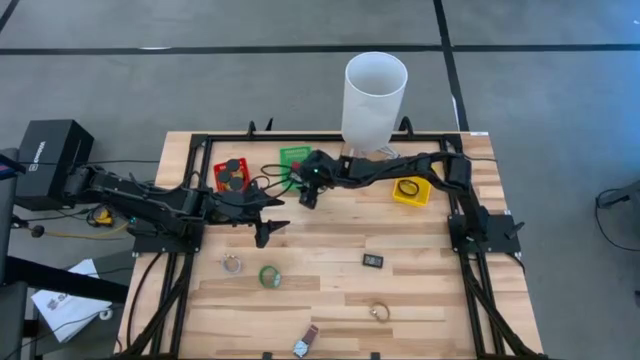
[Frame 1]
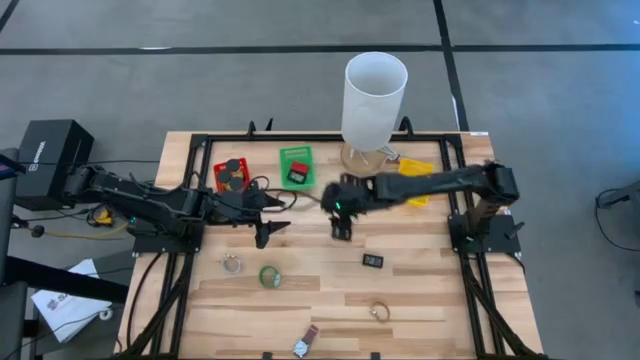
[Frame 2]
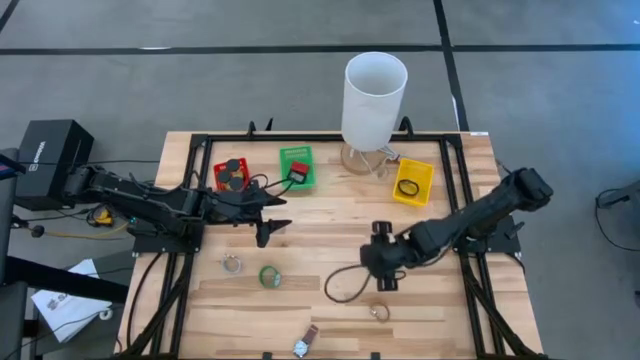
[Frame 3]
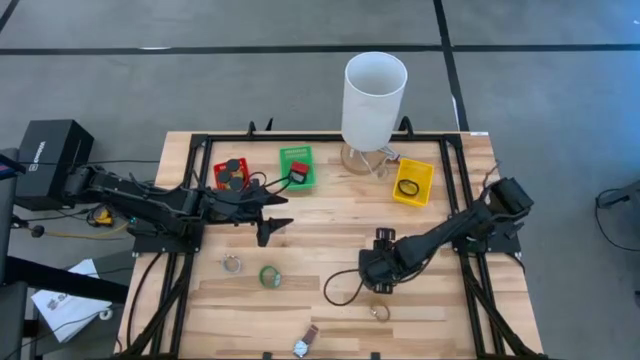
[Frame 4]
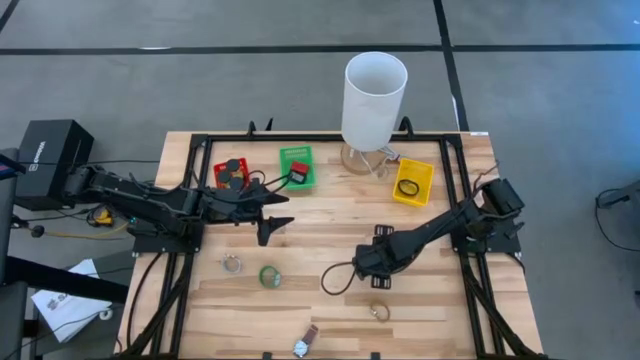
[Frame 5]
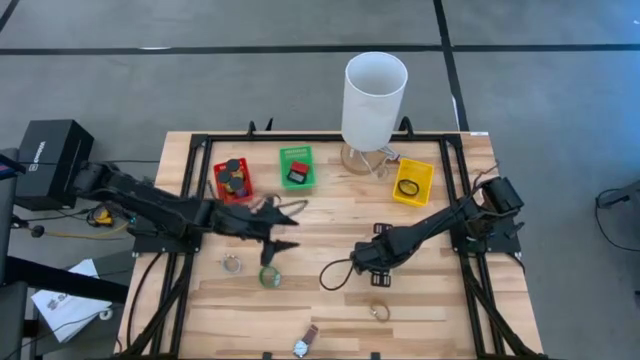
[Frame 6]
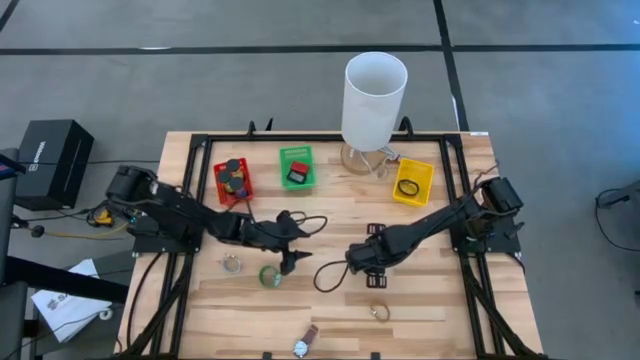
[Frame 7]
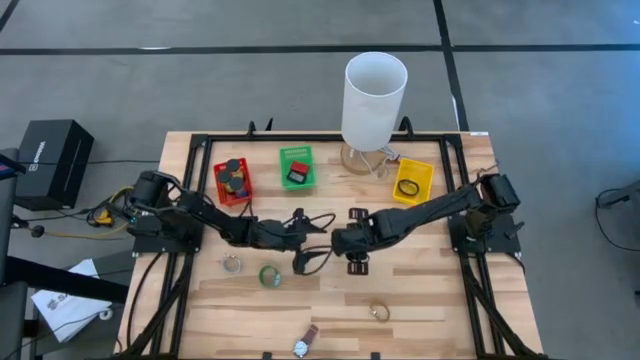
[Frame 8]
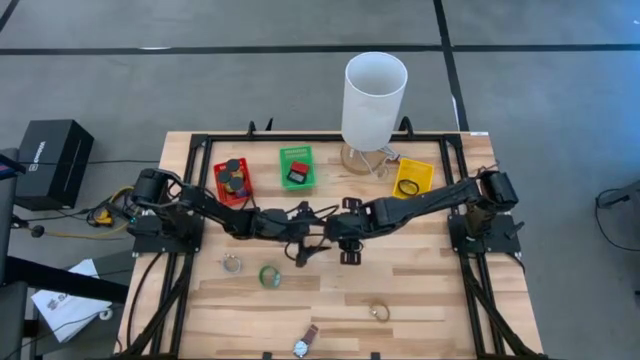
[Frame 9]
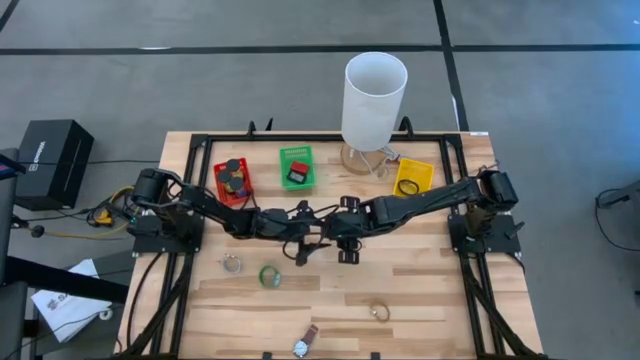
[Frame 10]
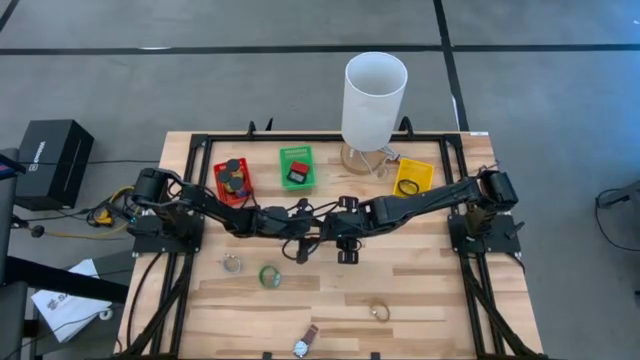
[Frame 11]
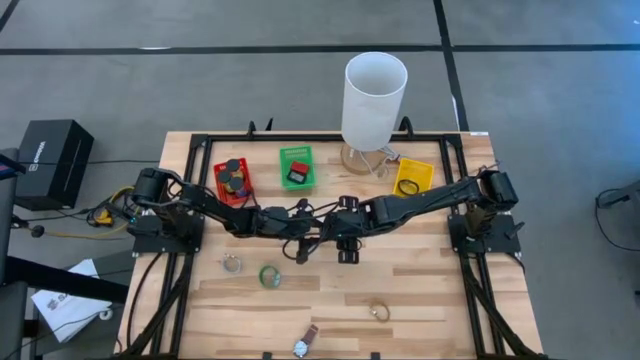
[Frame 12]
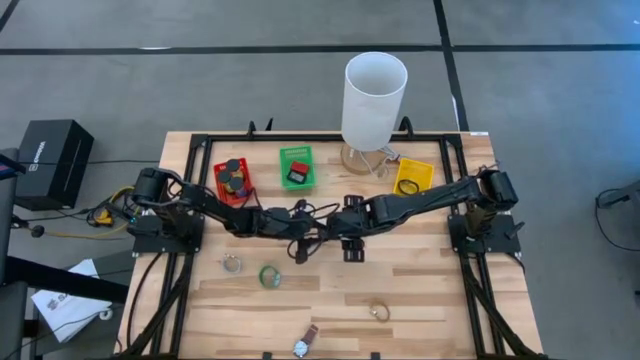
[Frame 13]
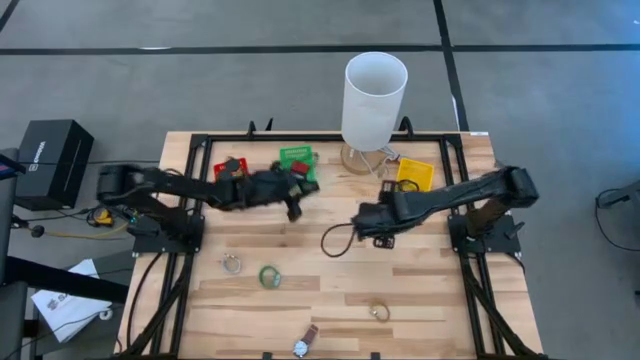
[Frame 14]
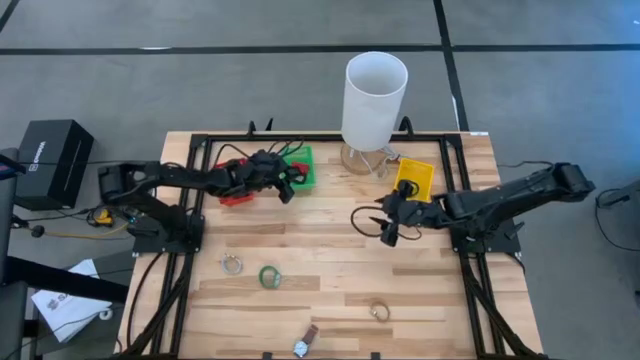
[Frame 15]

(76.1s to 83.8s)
Task: Pick & Place Office items
Put the black digital clock into the green bin

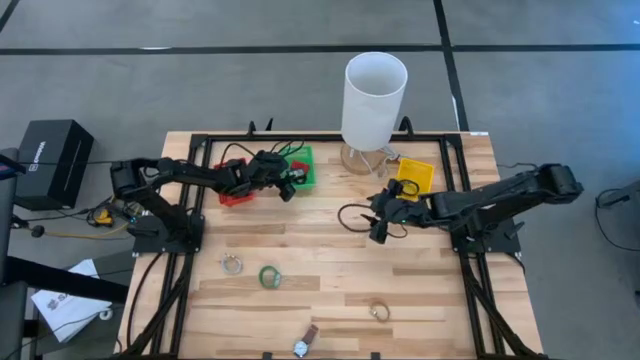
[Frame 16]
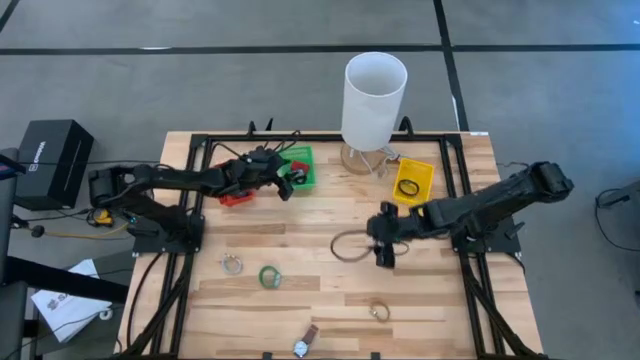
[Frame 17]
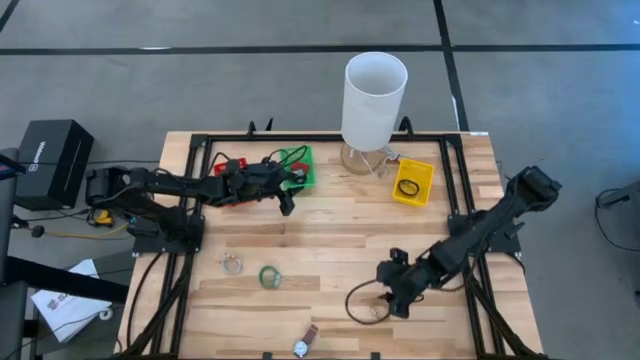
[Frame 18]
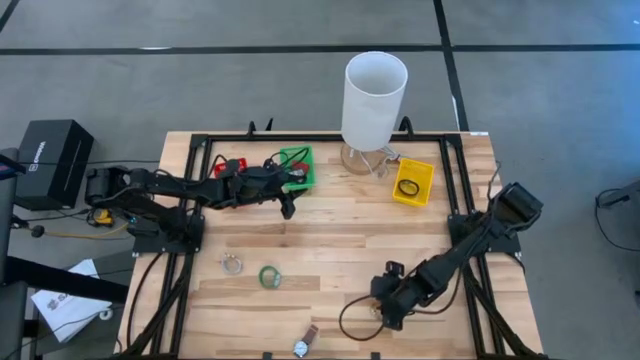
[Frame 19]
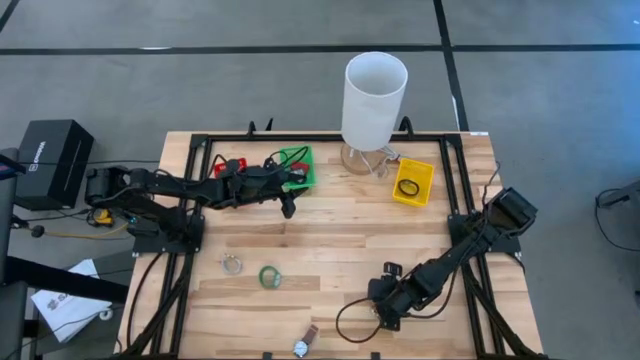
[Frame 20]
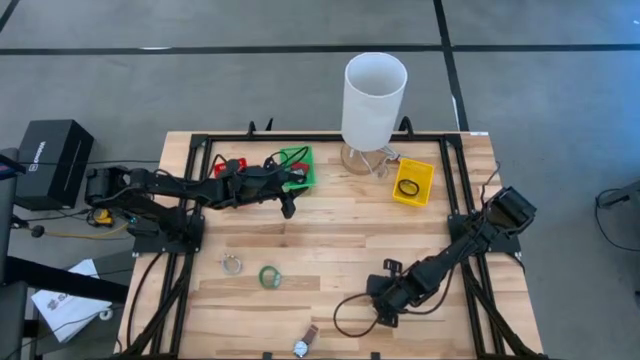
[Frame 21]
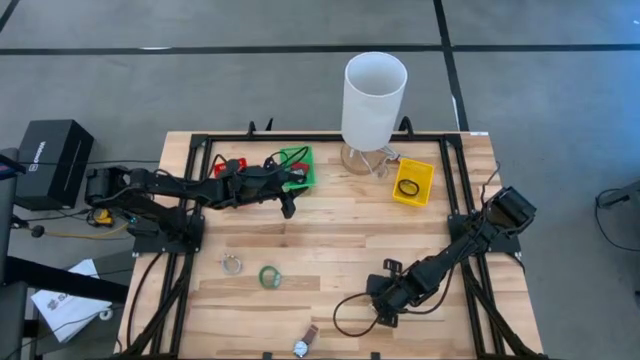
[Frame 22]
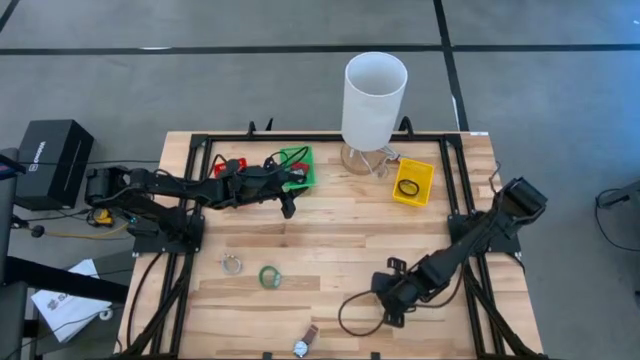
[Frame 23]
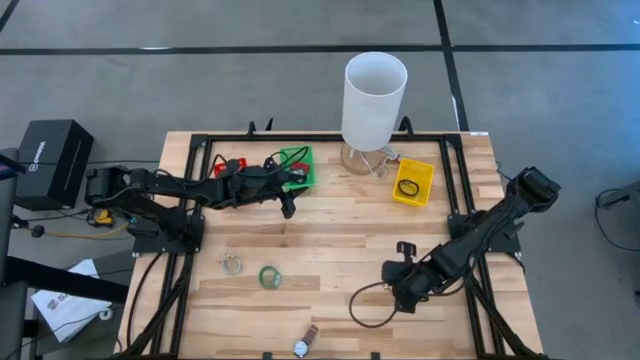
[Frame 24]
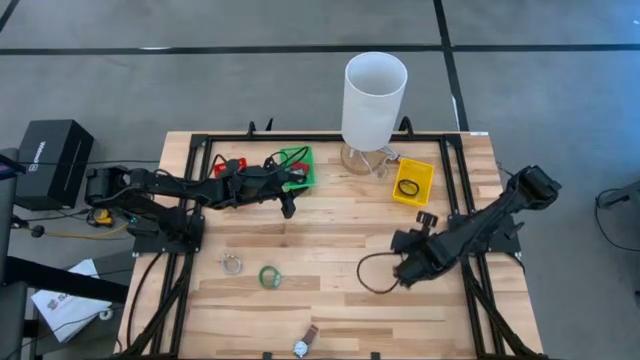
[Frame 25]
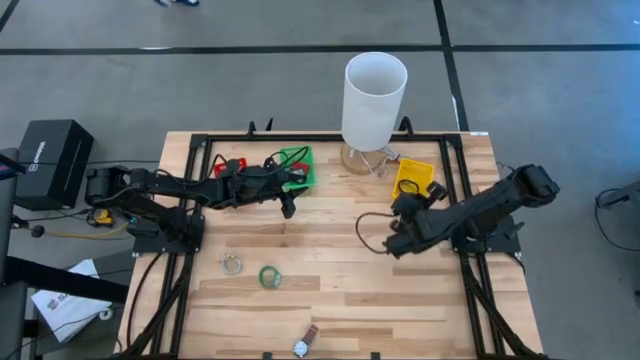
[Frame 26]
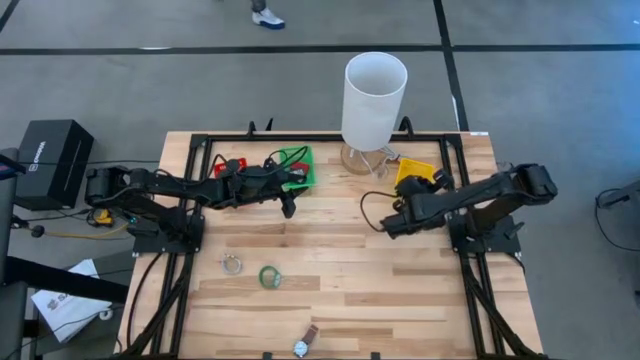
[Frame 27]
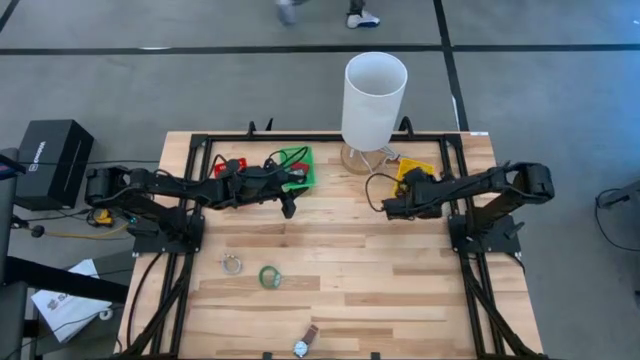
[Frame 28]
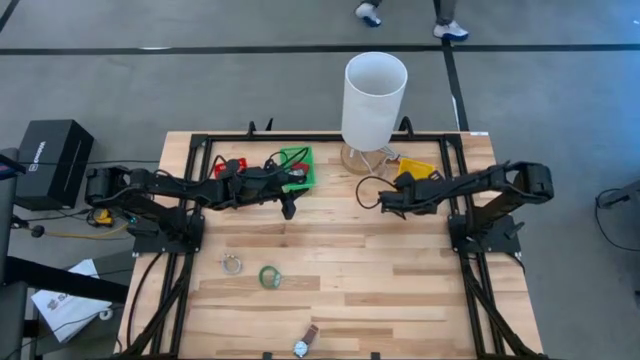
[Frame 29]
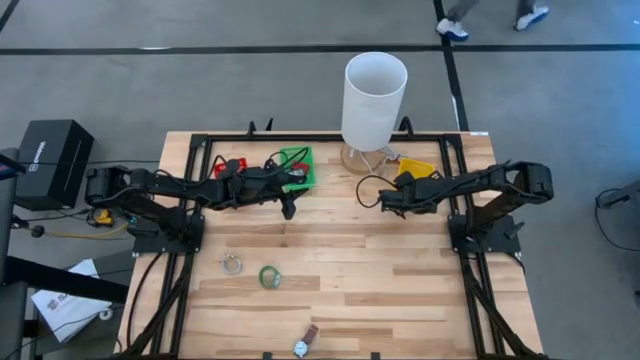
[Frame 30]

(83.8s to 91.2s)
Put the gold wrist watch into the yellow bin

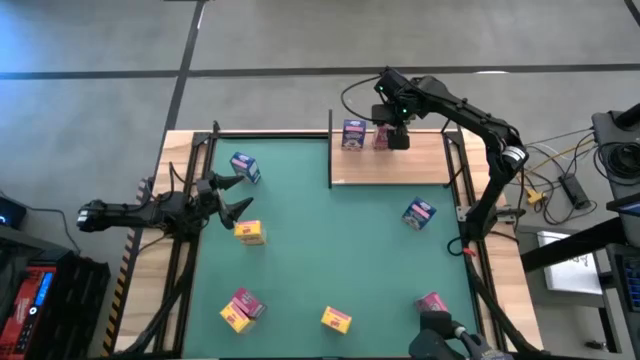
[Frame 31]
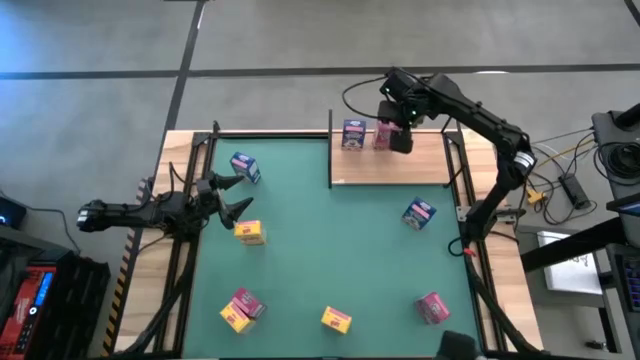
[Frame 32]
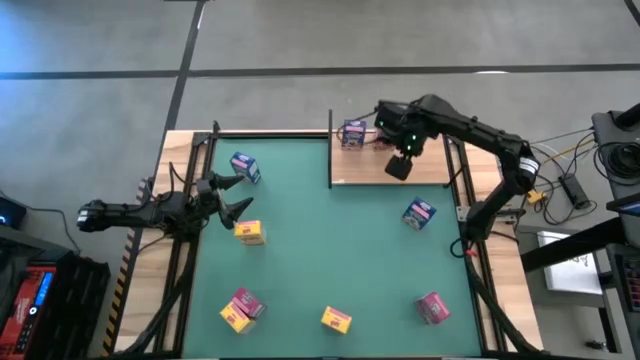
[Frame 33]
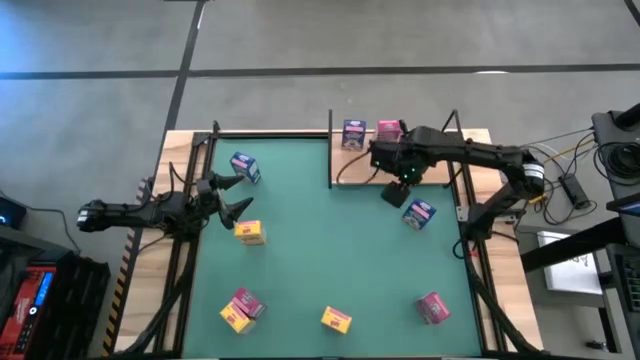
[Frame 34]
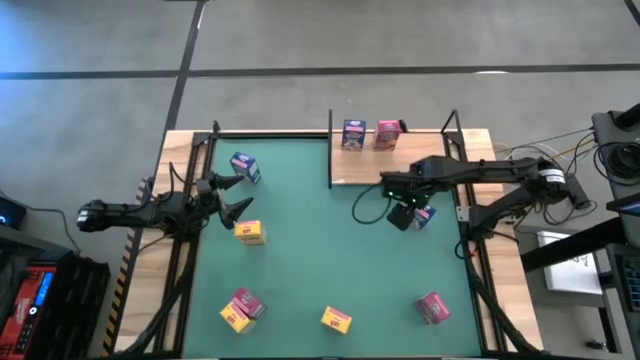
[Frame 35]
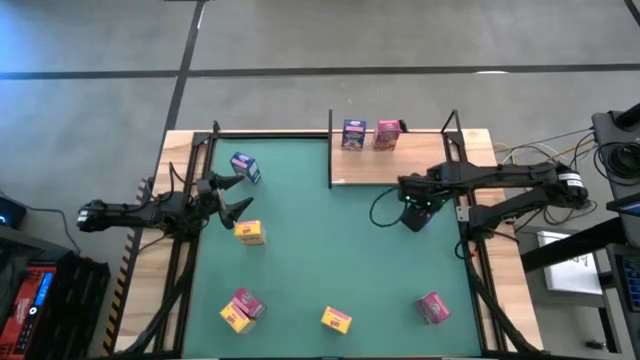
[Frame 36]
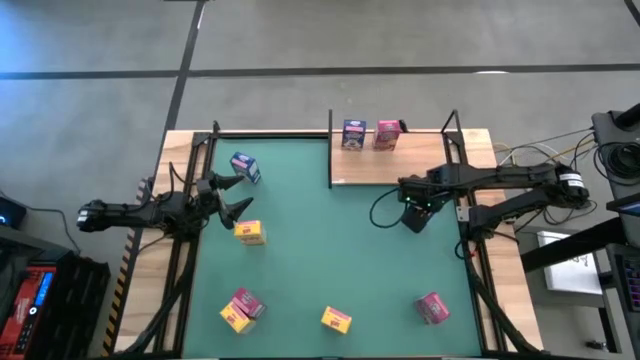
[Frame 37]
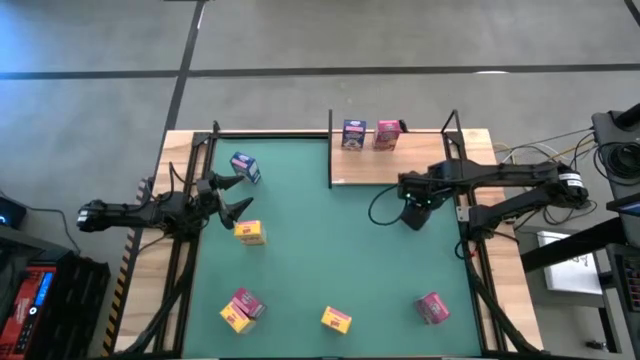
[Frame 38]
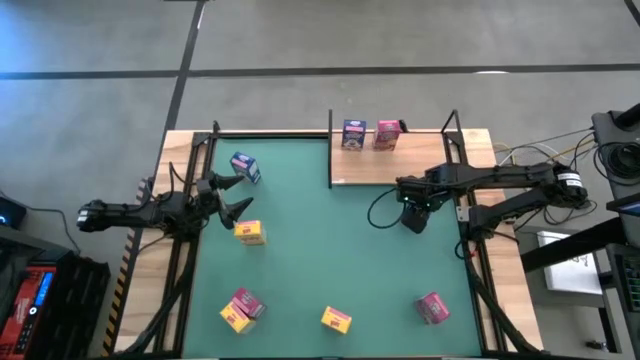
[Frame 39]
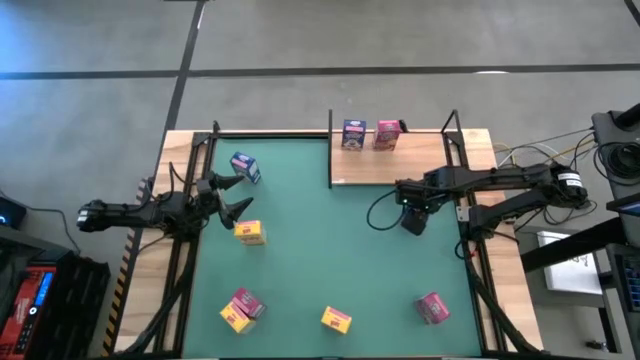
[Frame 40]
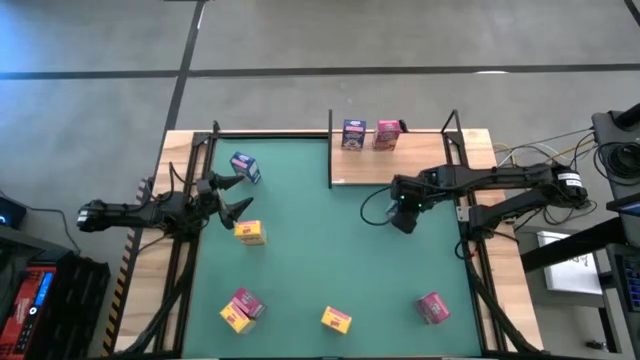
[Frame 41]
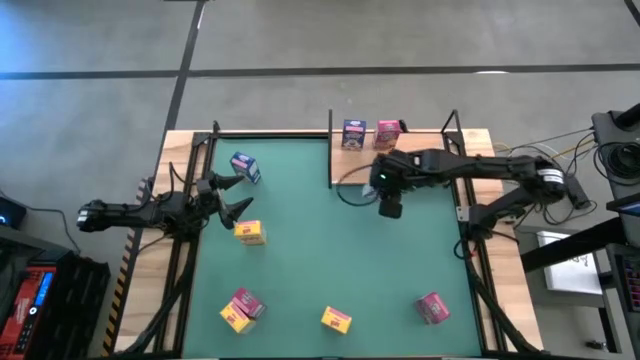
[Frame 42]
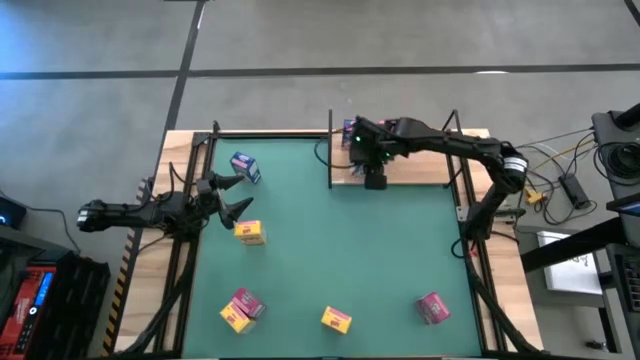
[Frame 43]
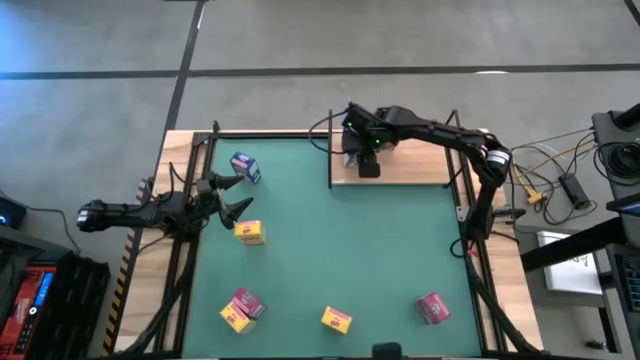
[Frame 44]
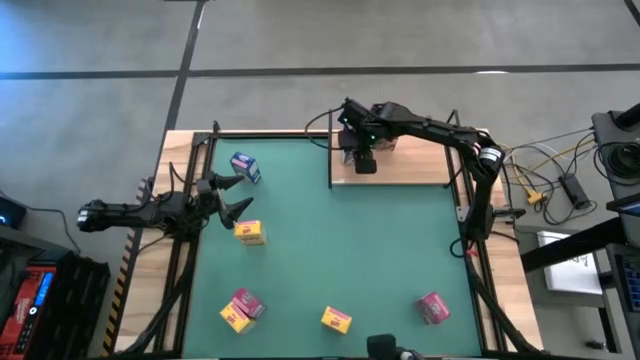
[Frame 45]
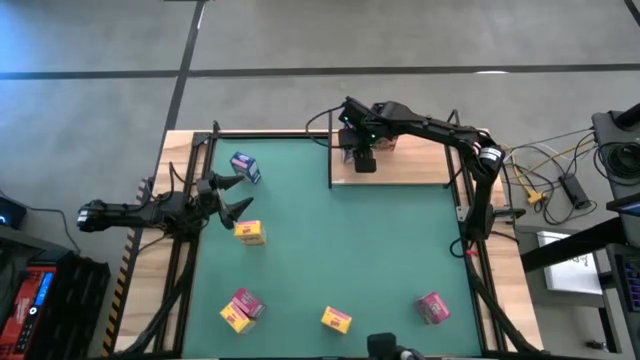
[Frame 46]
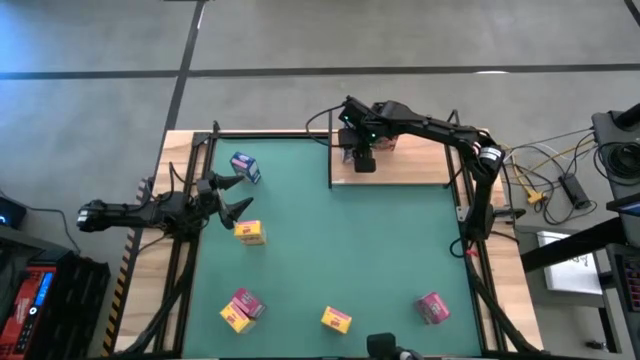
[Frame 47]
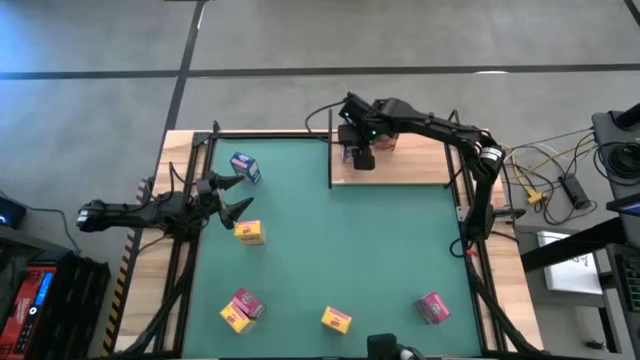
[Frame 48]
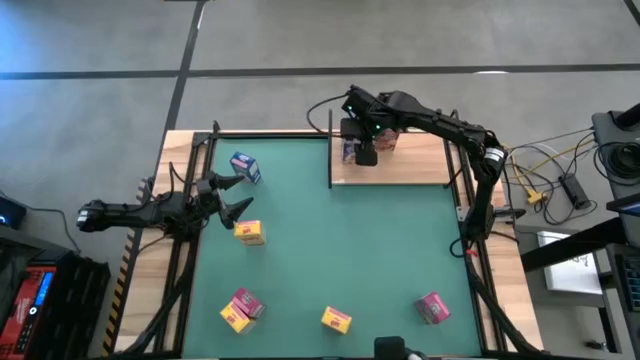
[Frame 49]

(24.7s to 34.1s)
Task: Stack cereal on shelf
Put the right blue cereal box on the shelf
